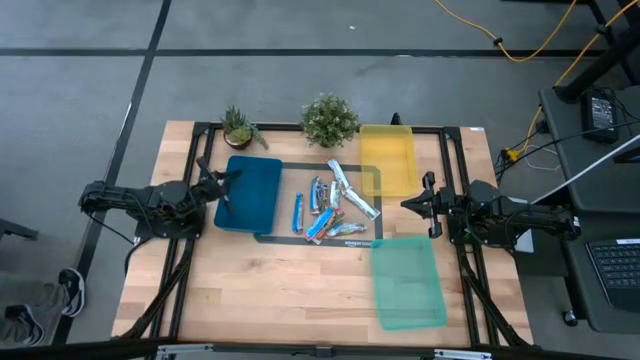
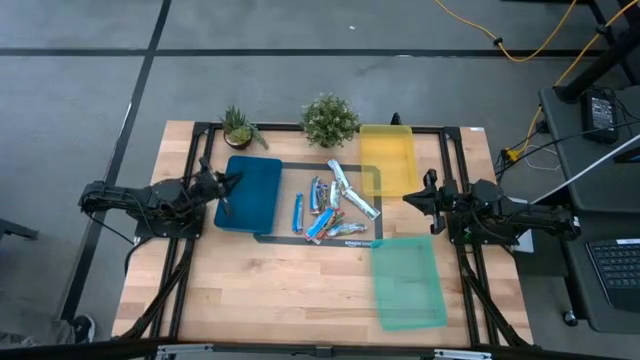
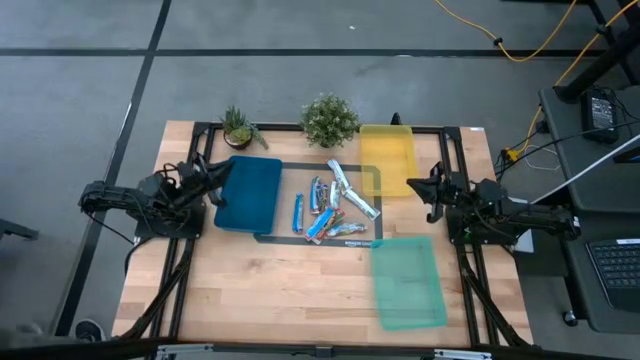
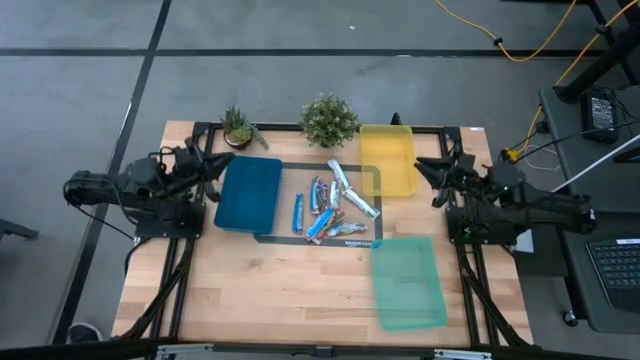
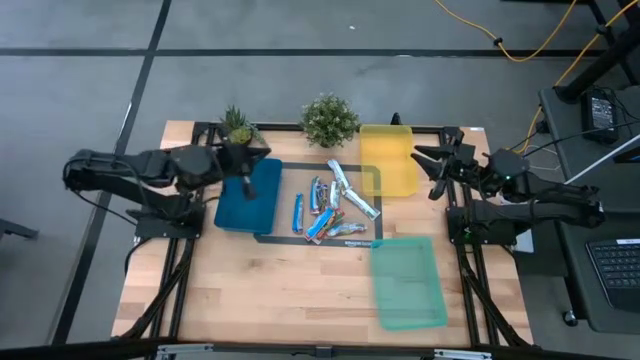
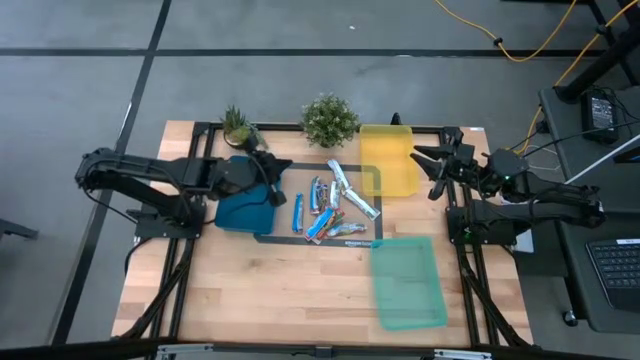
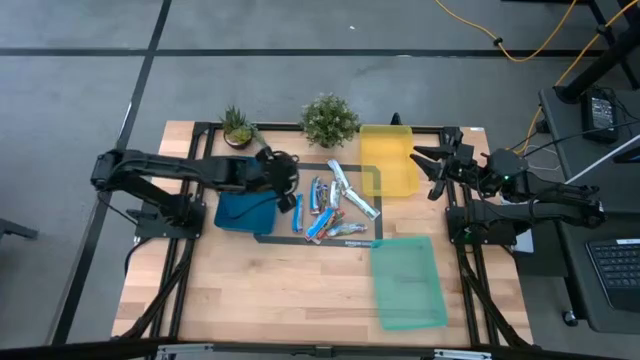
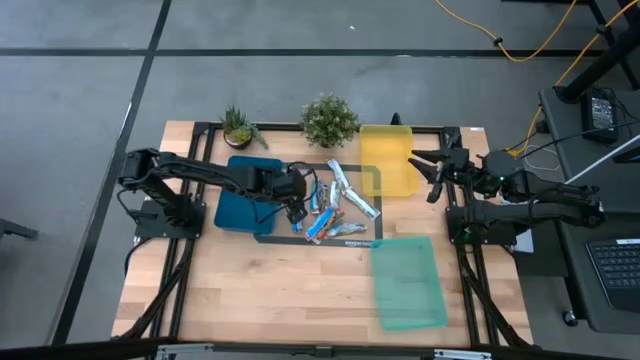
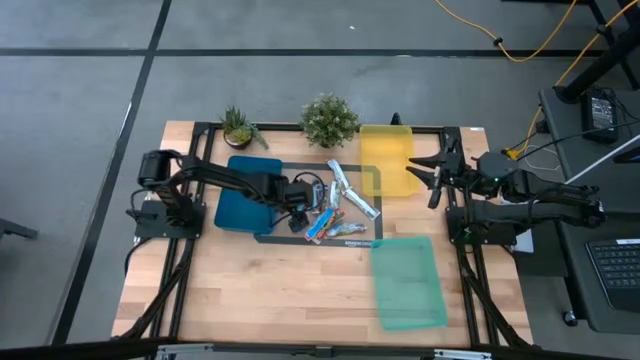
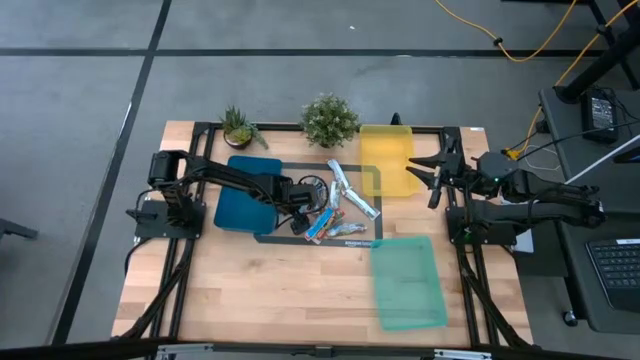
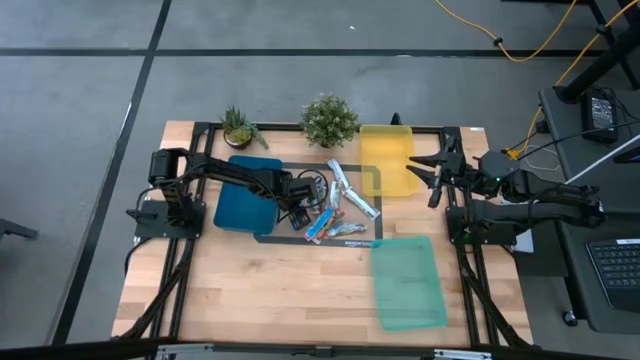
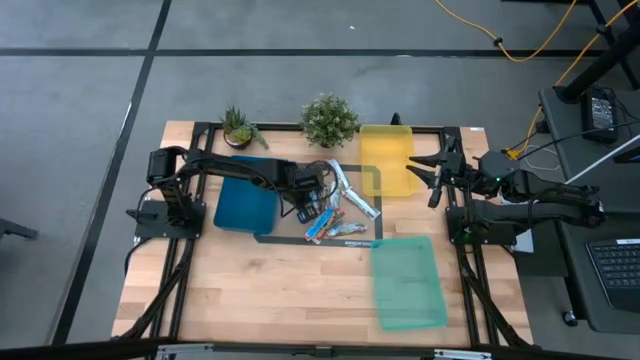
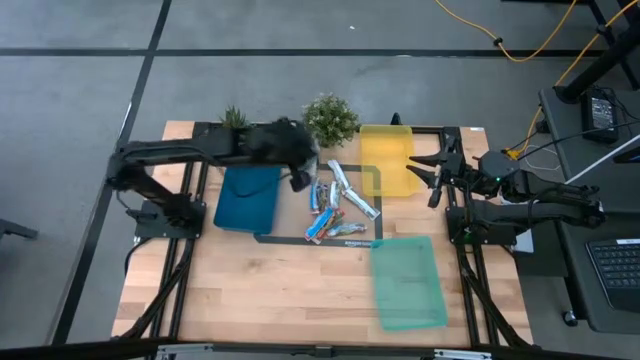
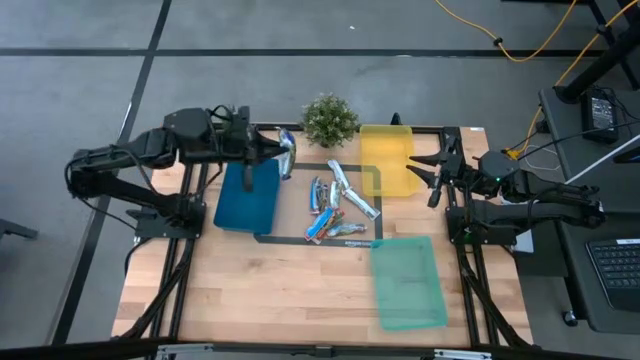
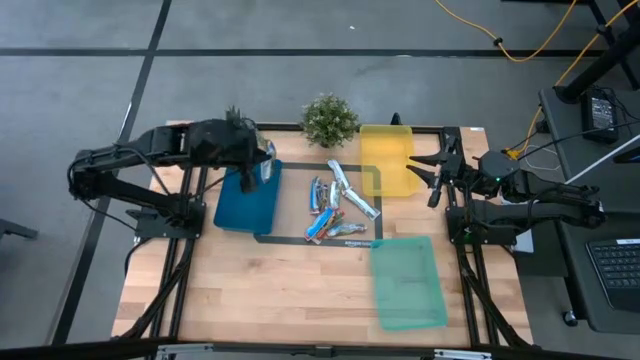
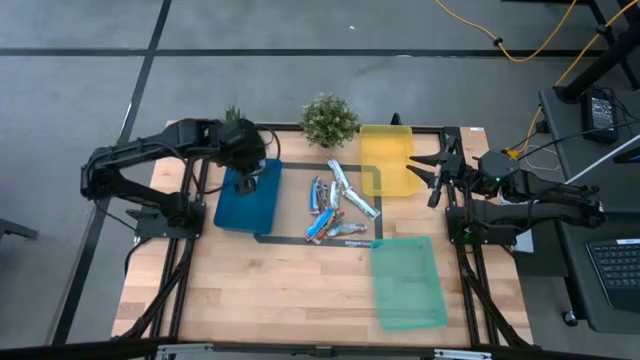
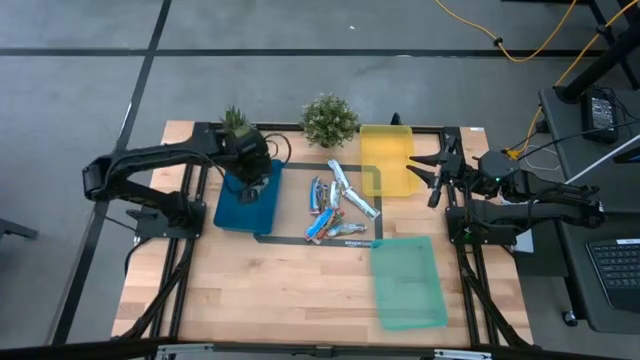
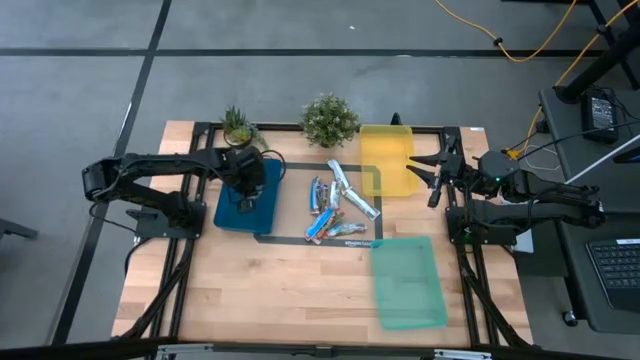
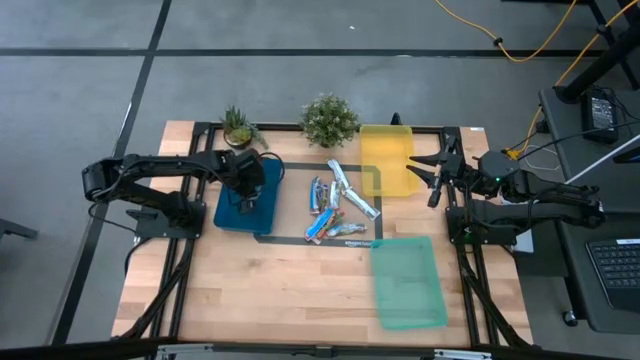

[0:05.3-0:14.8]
Task: Pick and place Granola Bars by type
Put the blue granola bar into the blue bin

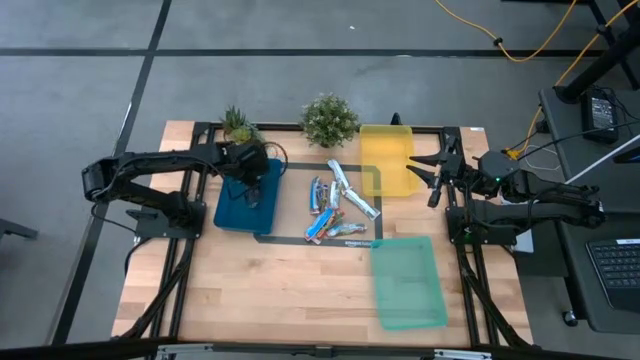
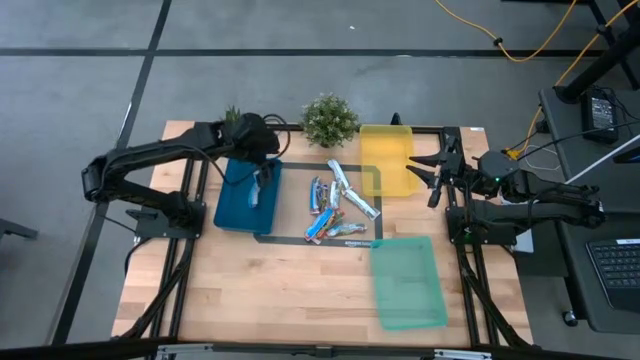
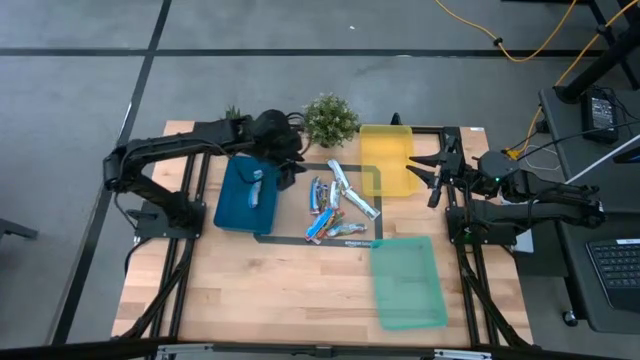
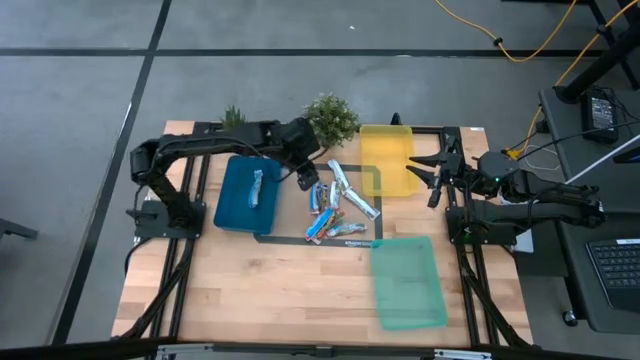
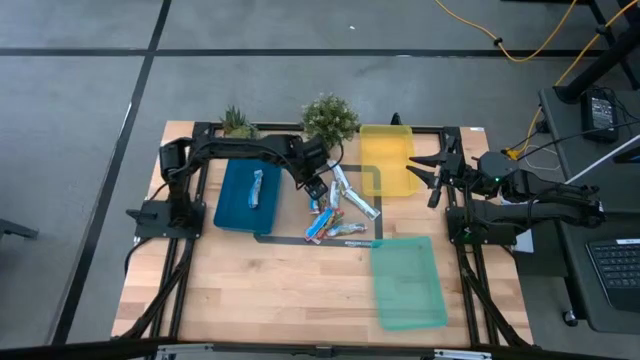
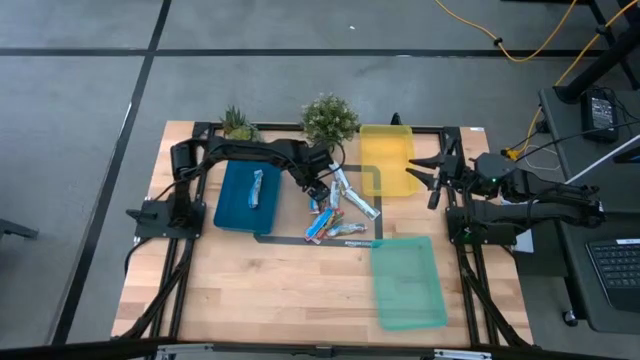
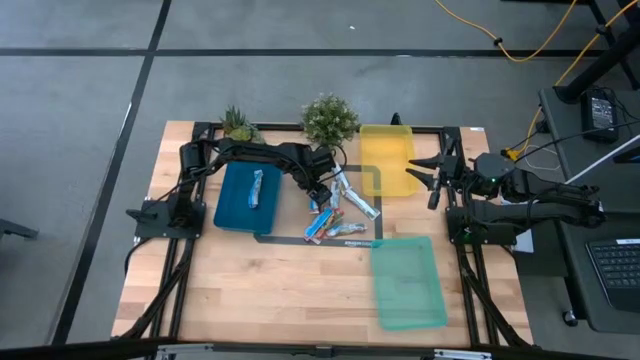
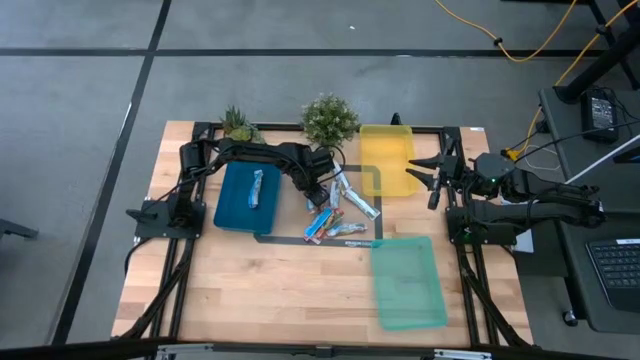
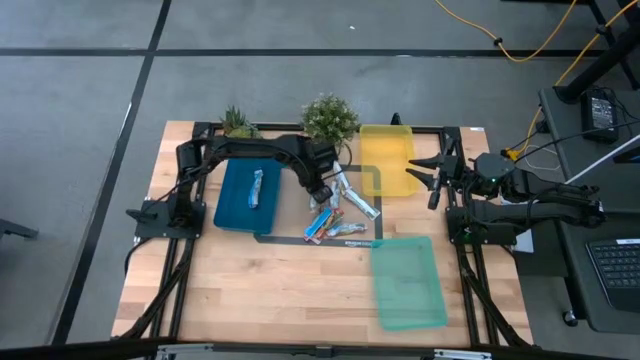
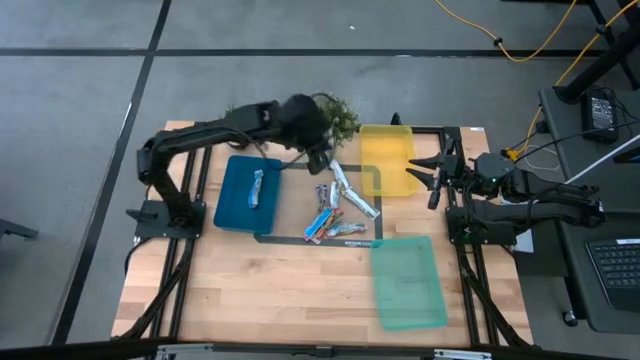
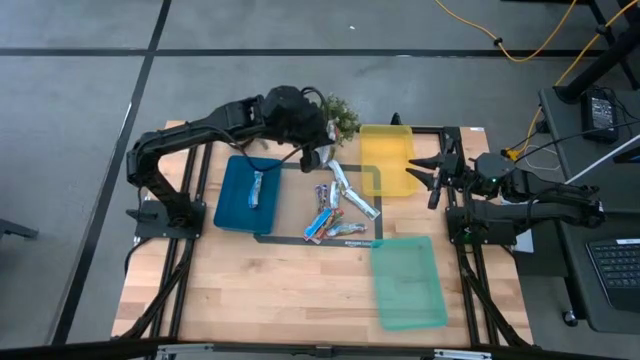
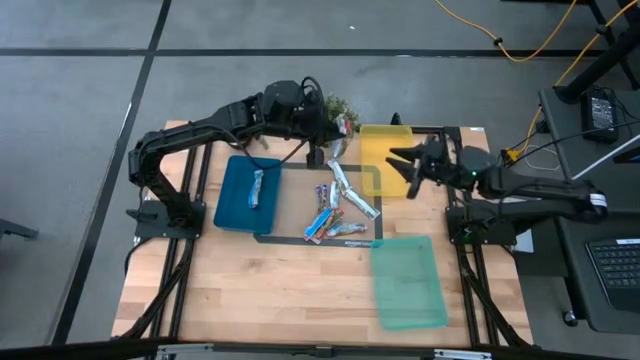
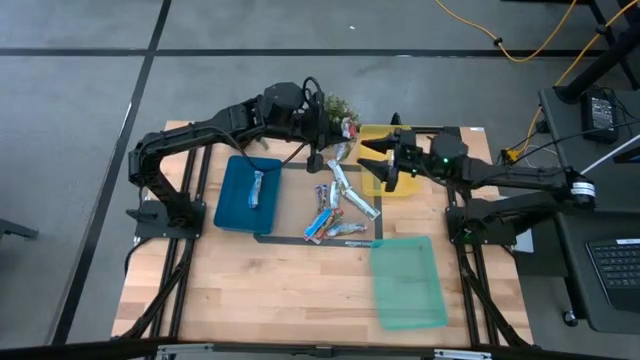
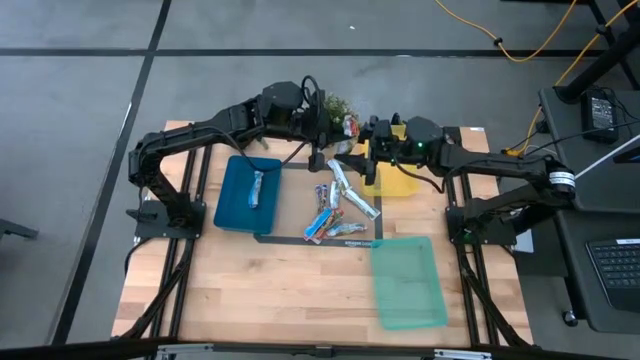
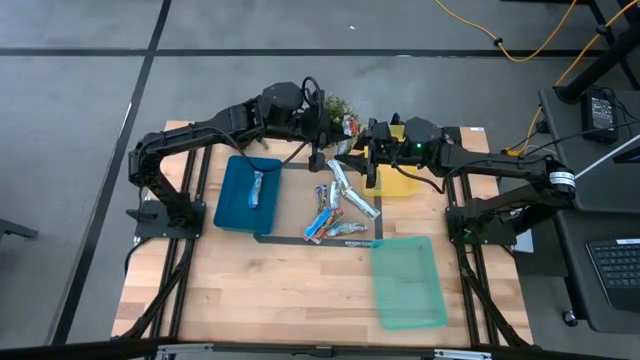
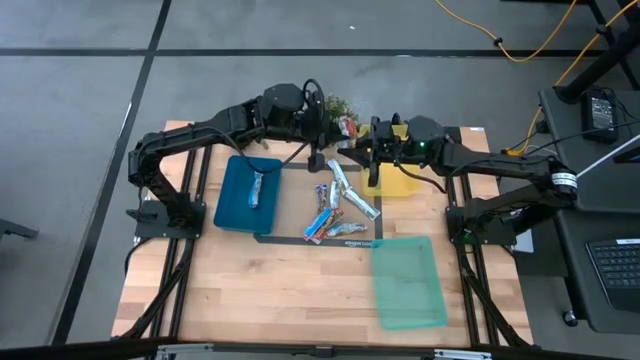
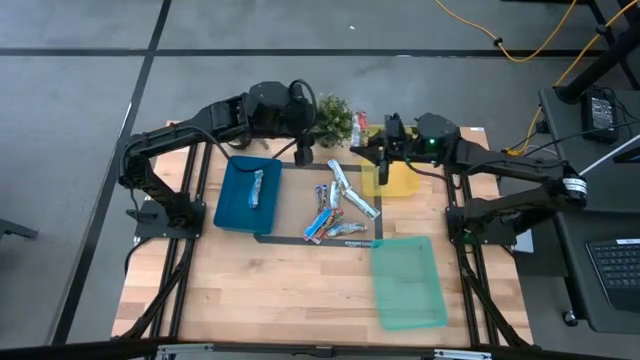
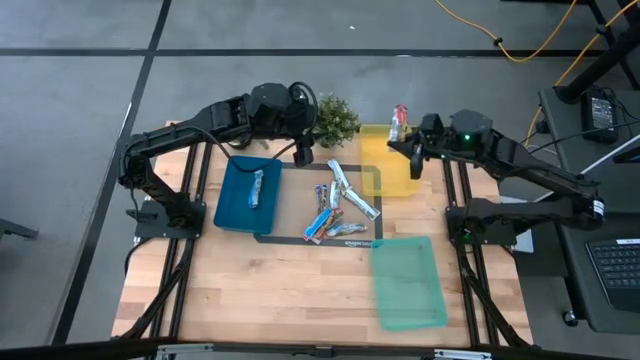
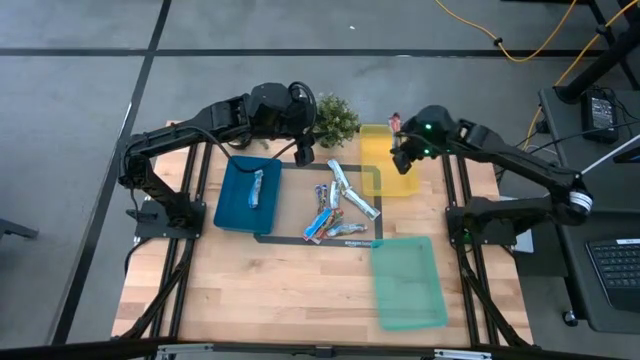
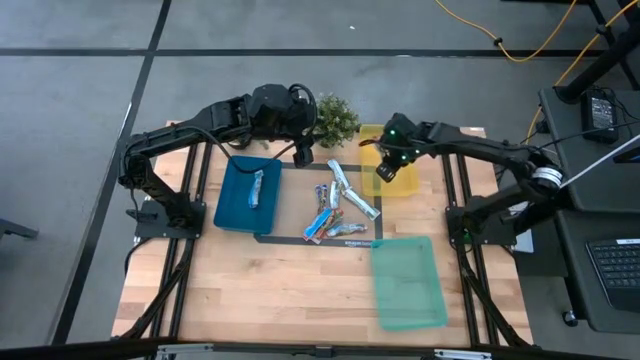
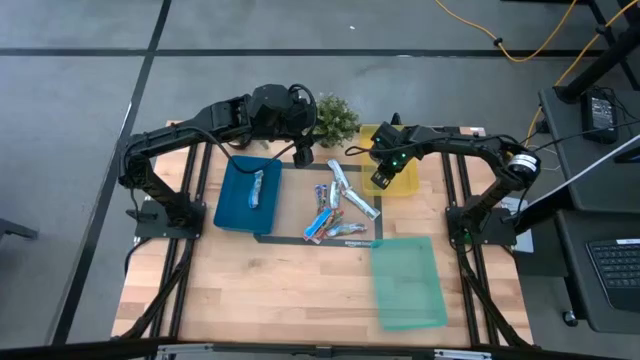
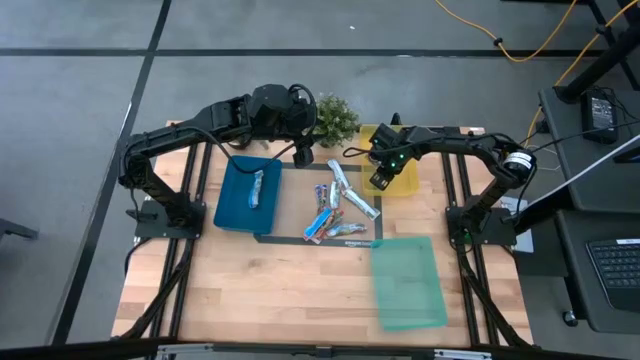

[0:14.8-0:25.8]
Put the red granola bar into the yellow bin
